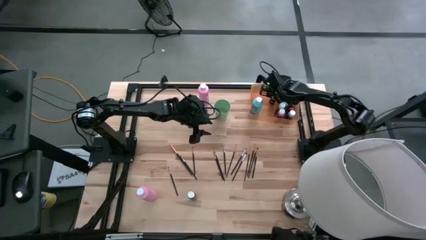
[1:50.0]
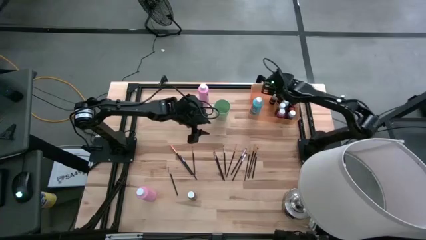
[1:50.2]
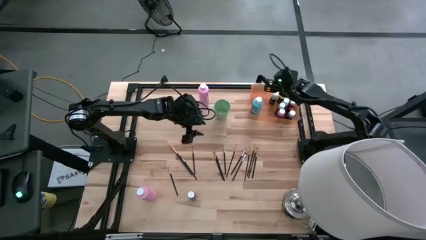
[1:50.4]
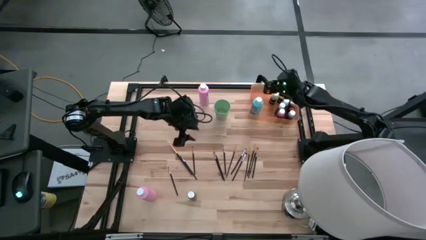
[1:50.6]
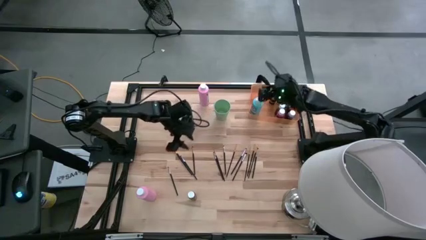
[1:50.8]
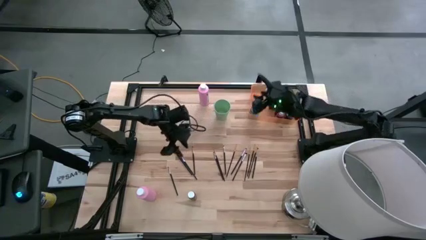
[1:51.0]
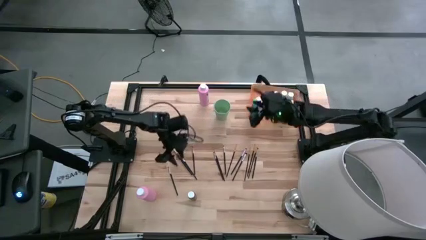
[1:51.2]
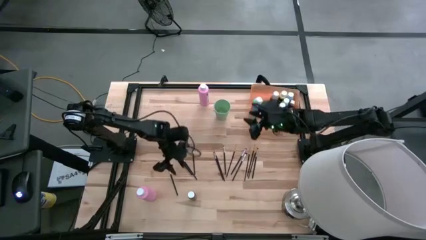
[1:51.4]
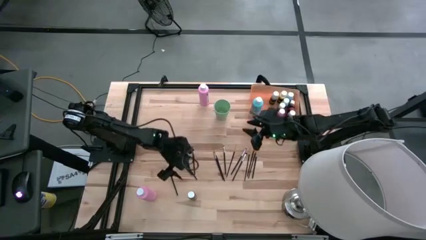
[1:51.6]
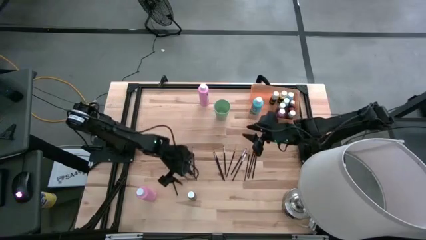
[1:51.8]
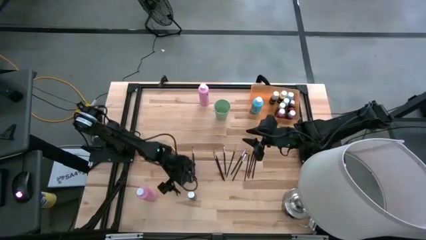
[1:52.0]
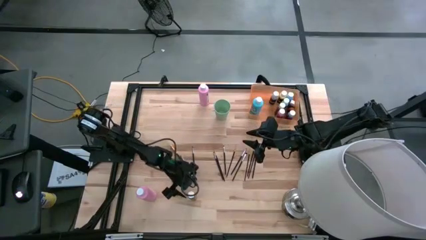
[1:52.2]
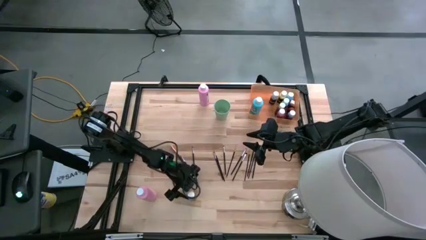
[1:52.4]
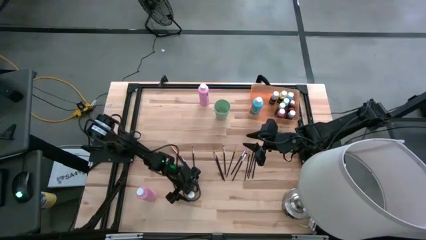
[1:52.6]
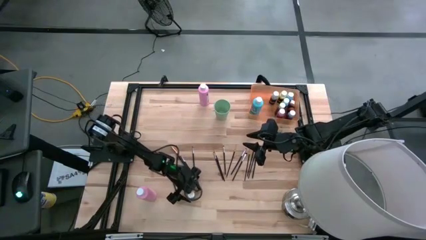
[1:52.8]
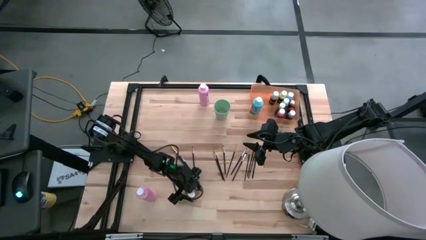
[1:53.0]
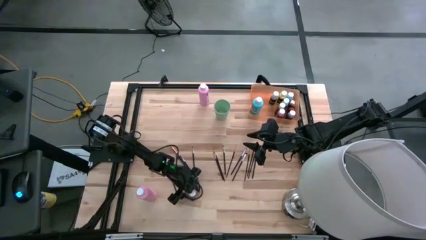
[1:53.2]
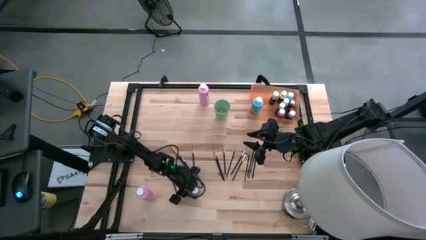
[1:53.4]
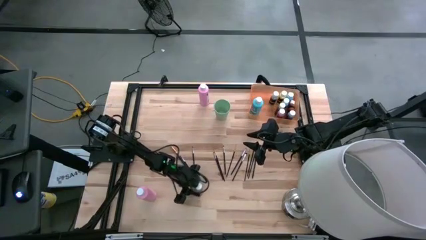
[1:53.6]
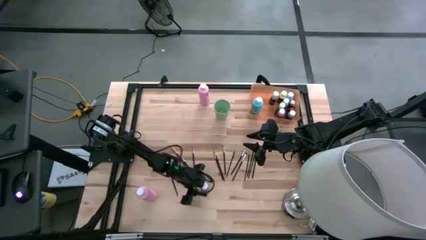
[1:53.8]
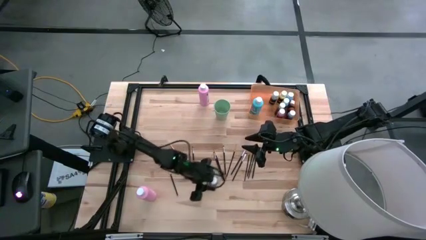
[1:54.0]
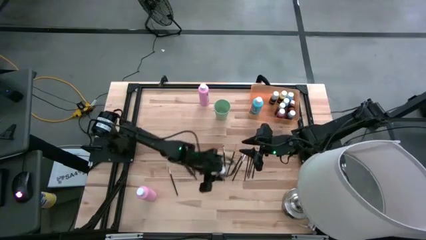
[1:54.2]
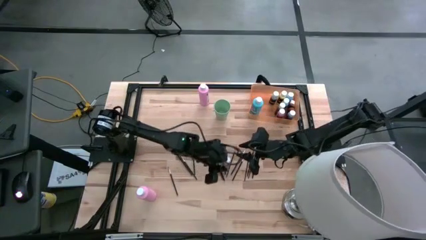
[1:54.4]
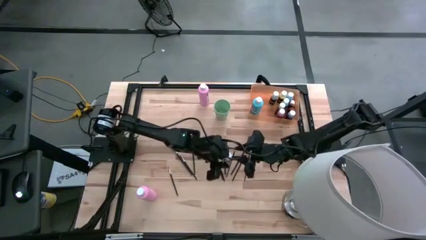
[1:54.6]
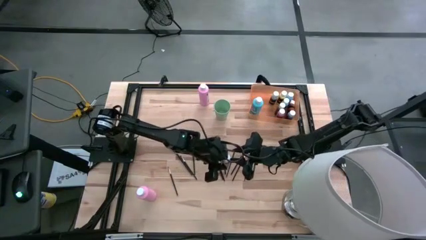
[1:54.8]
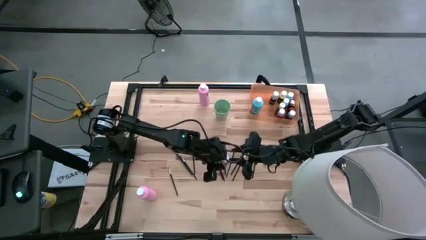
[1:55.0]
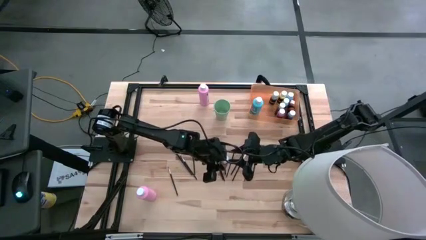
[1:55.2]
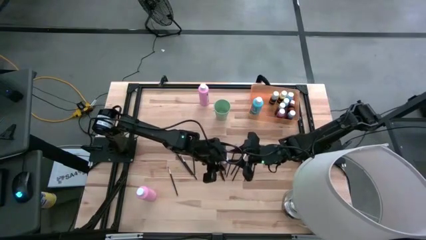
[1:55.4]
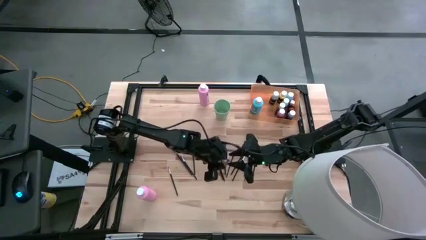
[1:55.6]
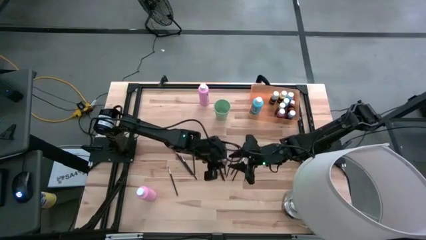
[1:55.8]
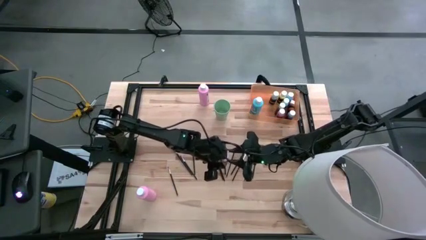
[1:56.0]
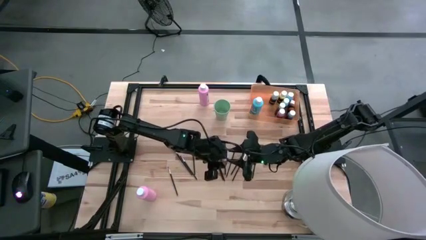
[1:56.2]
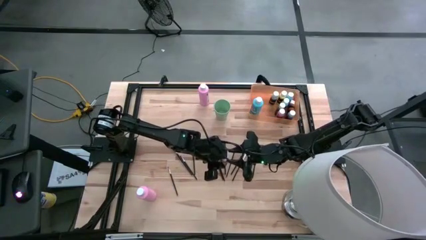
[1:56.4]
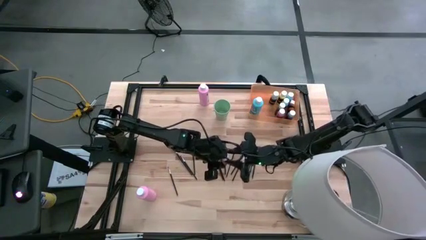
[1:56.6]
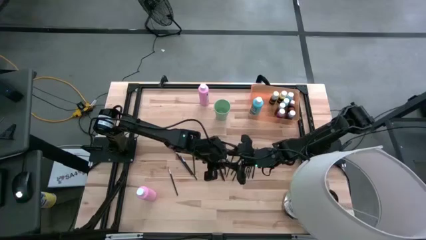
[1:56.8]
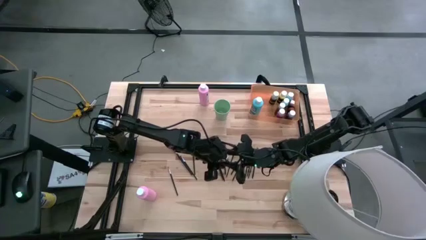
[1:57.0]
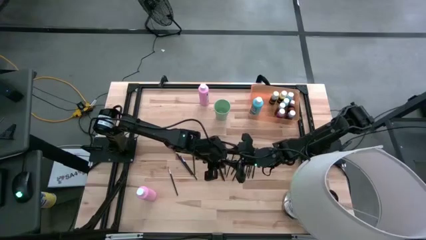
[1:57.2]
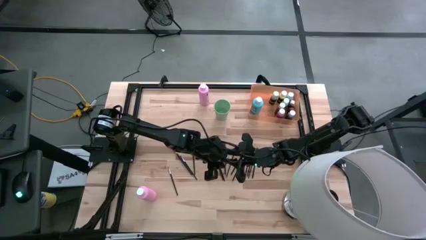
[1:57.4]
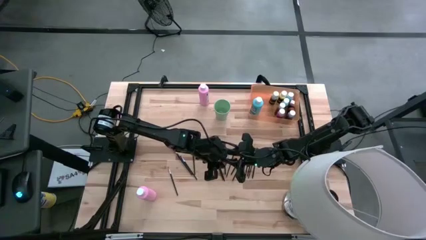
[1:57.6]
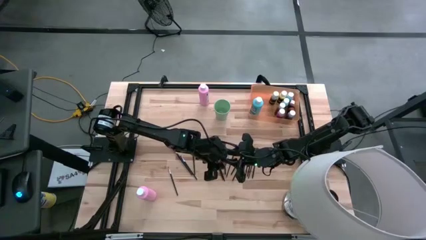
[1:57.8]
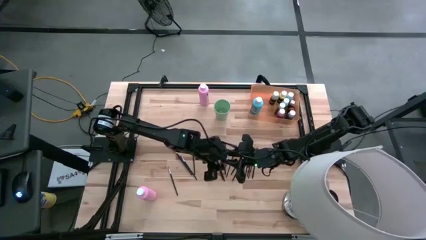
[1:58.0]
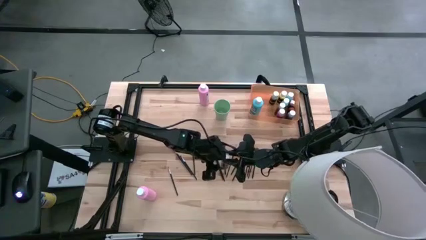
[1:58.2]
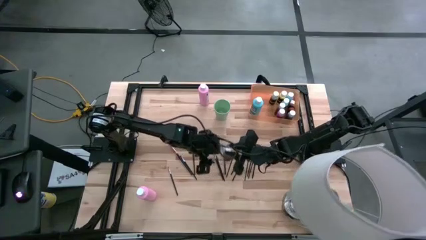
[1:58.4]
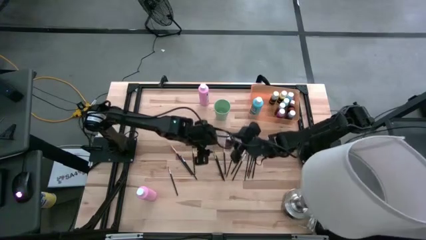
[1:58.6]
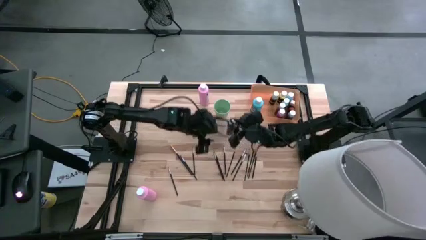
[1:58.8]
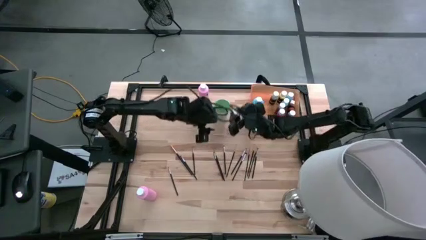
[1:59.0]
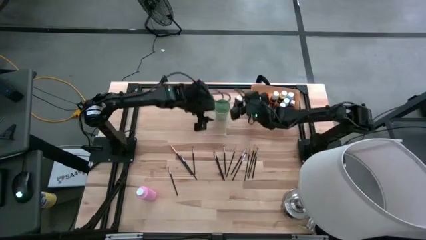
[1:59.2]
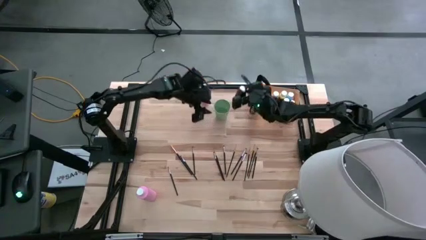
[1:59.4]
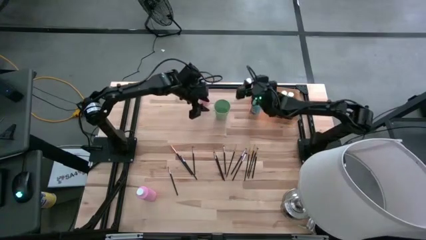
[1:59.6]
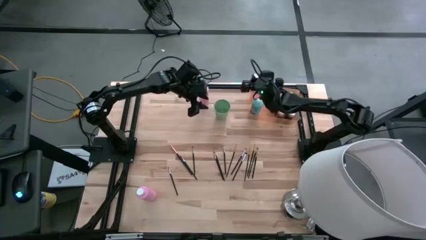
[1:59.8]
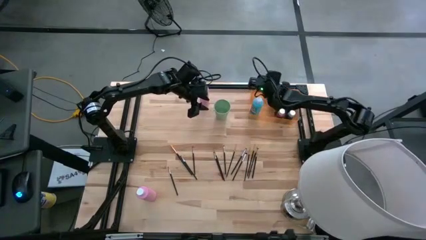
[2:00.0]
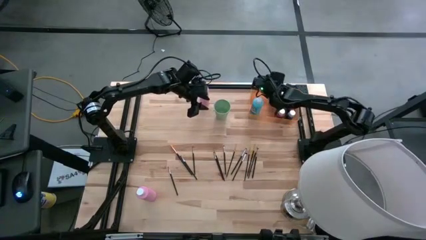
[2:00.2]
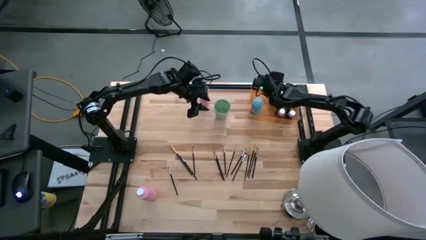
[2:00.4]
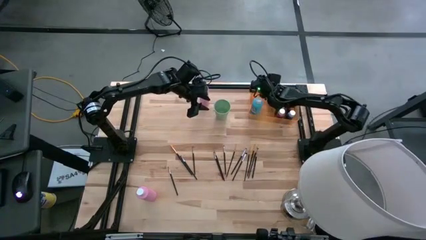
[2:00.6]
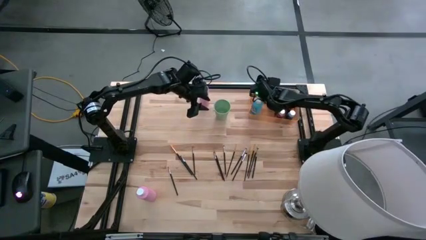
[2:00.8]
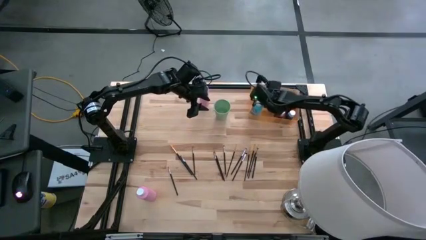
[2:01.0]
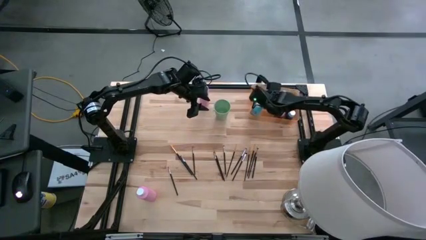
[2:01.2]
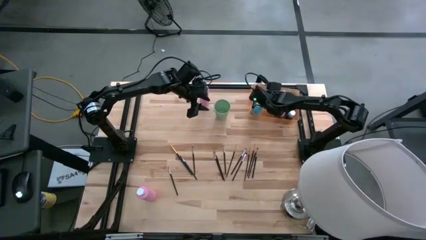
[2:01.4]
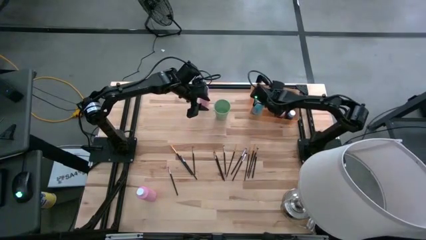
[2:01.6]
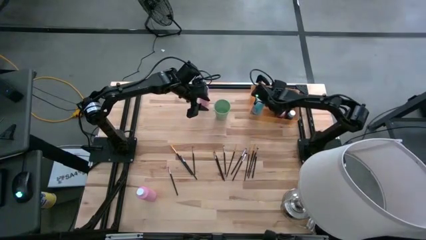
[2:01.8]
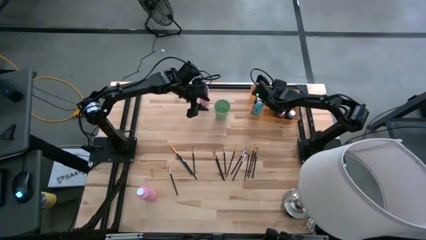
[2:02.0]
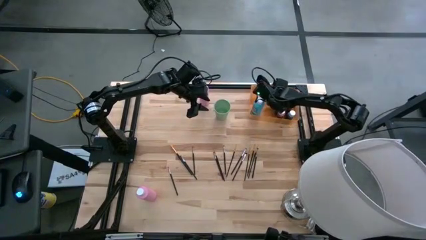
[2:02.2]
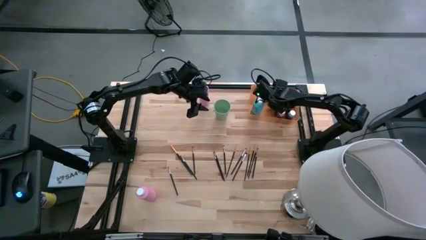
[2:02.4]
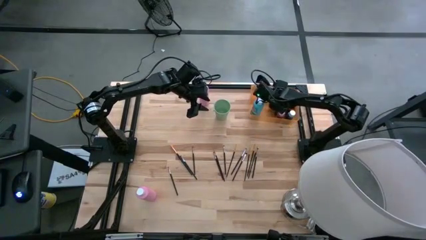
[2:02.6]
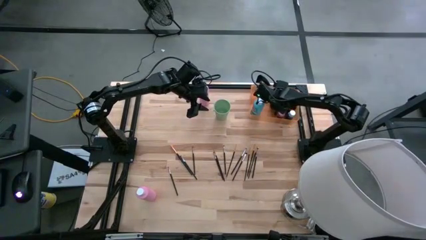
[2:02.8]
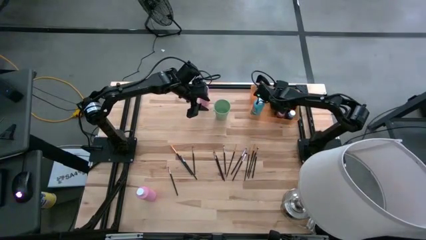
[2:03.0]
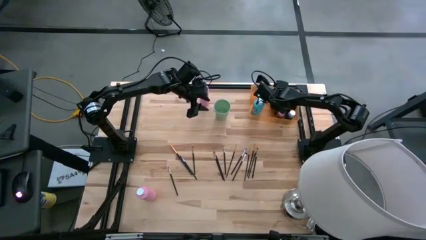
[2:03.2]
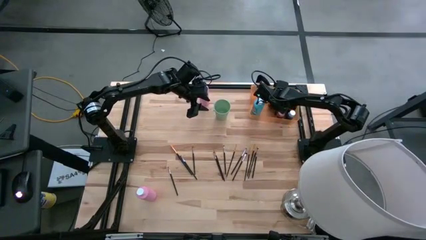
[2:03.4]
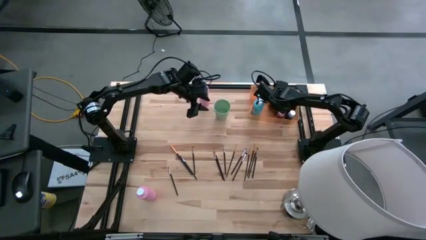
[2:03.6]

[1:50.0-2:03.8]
Task: Pick & Place Paint Supplies
Put the small brown paint bottle into the orange bin
